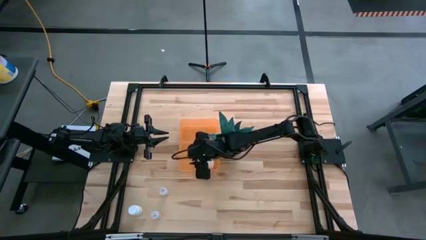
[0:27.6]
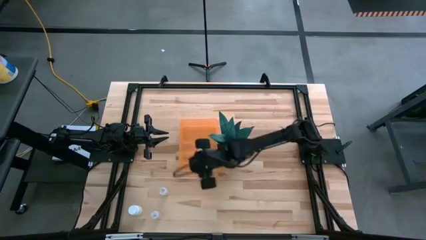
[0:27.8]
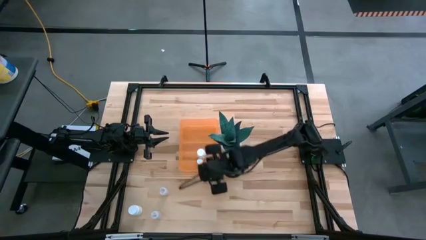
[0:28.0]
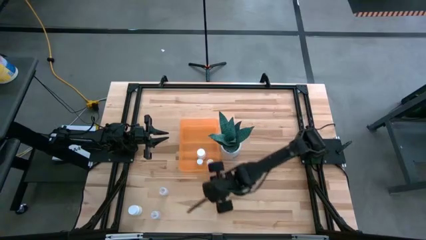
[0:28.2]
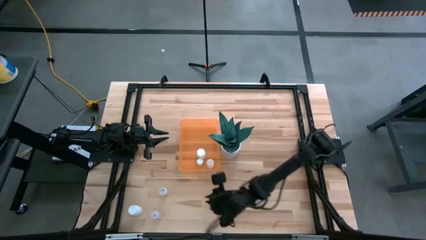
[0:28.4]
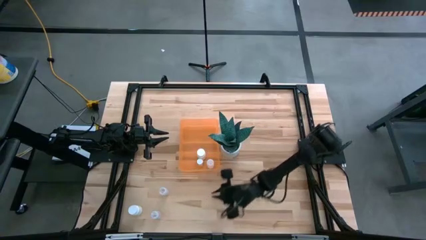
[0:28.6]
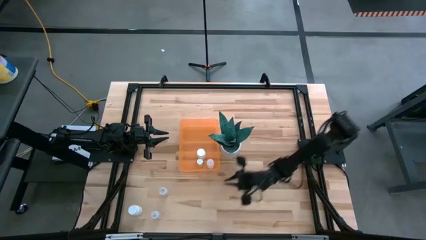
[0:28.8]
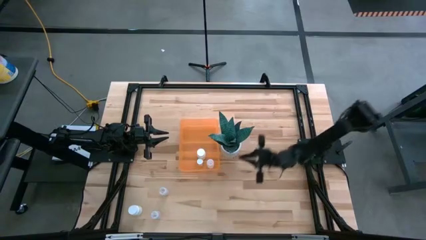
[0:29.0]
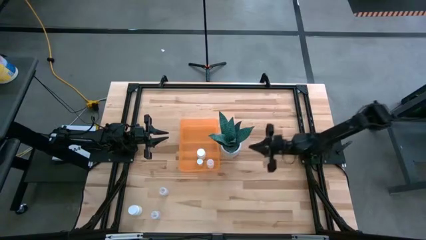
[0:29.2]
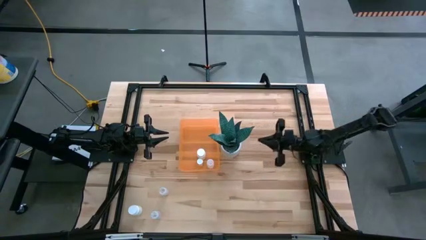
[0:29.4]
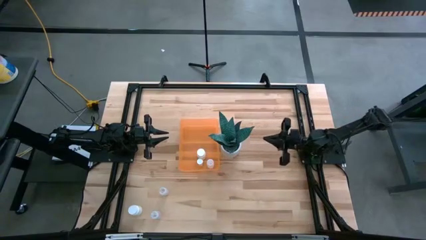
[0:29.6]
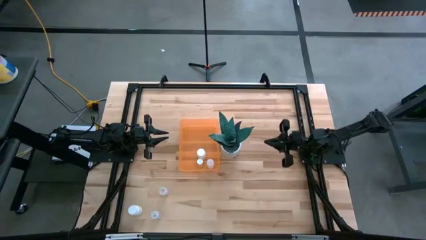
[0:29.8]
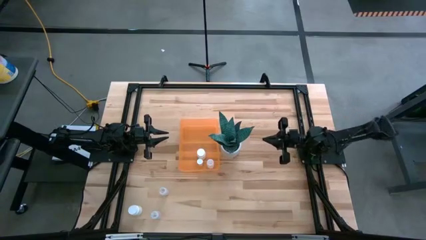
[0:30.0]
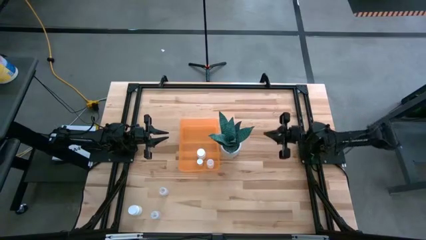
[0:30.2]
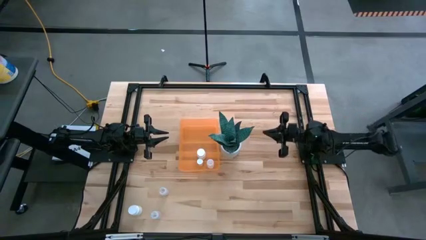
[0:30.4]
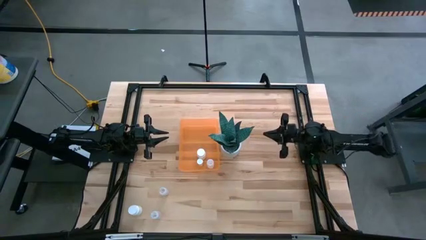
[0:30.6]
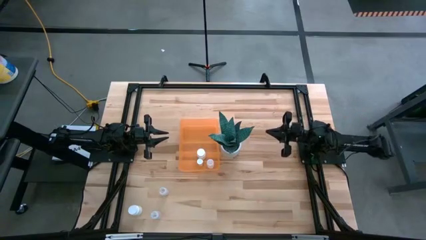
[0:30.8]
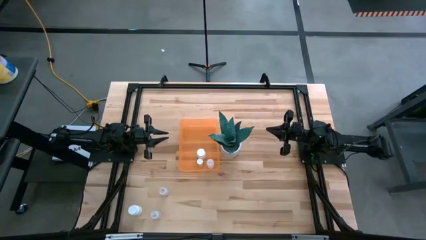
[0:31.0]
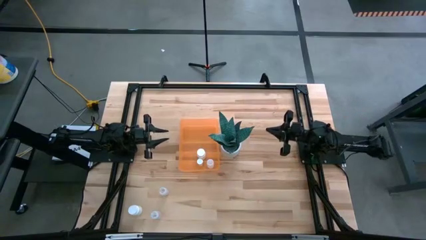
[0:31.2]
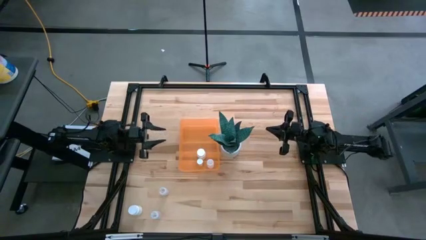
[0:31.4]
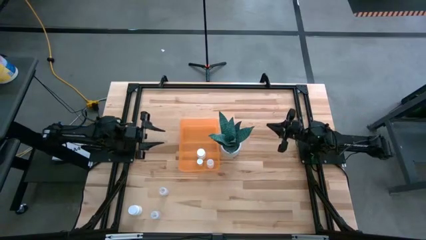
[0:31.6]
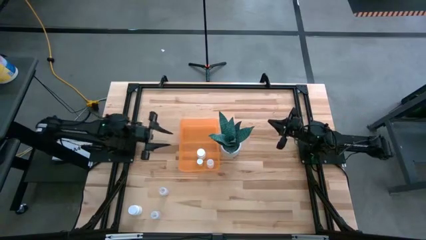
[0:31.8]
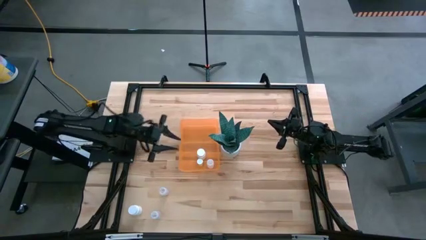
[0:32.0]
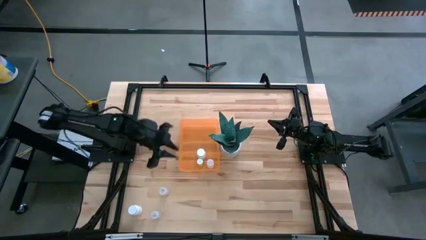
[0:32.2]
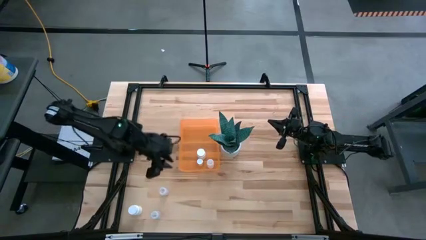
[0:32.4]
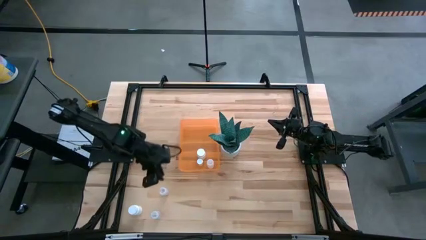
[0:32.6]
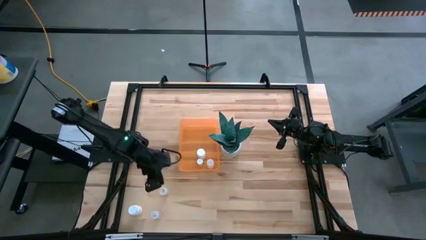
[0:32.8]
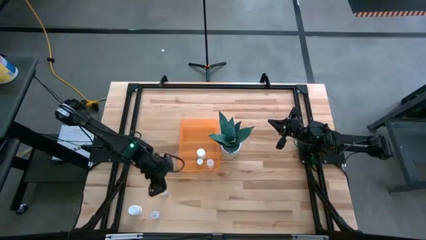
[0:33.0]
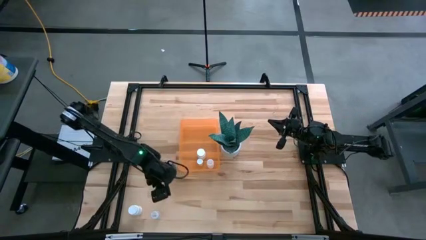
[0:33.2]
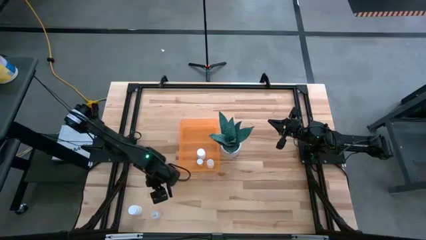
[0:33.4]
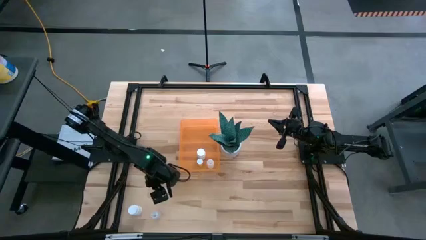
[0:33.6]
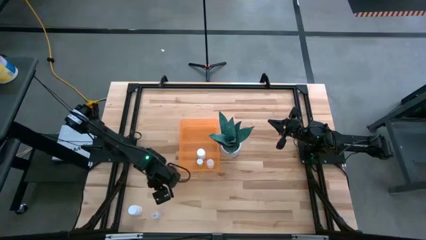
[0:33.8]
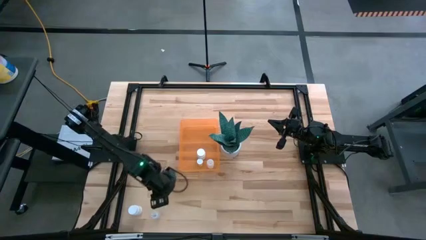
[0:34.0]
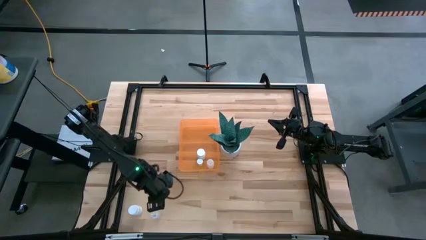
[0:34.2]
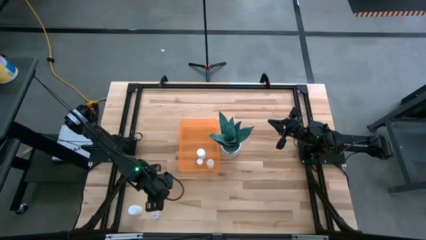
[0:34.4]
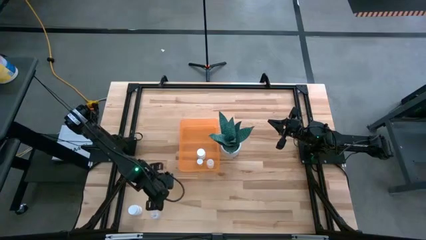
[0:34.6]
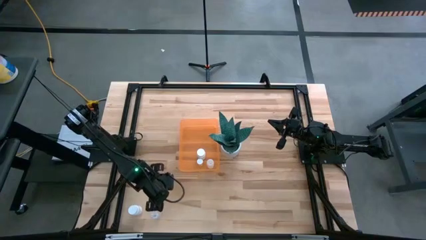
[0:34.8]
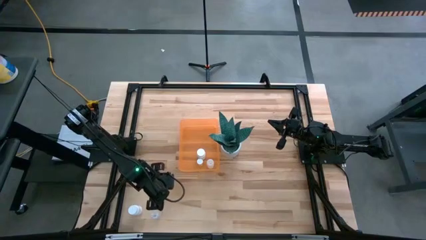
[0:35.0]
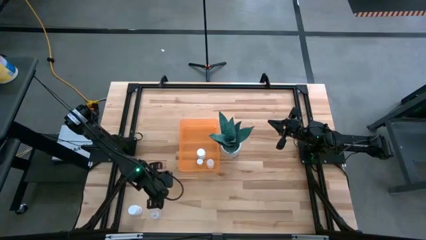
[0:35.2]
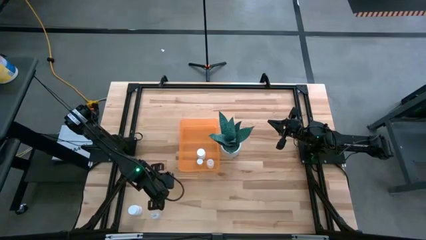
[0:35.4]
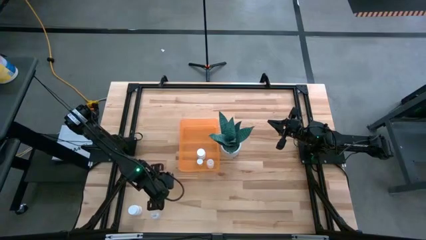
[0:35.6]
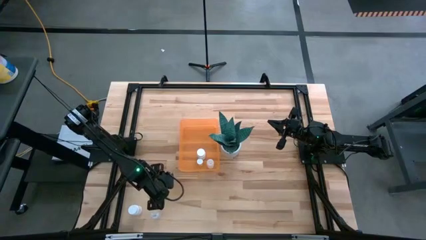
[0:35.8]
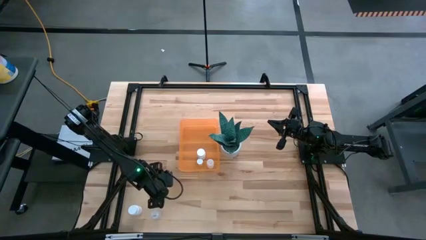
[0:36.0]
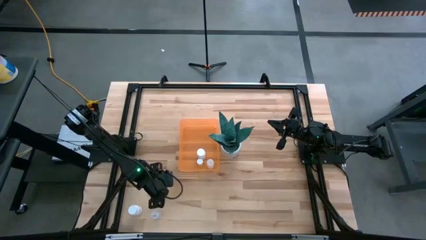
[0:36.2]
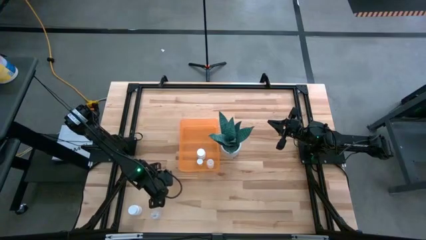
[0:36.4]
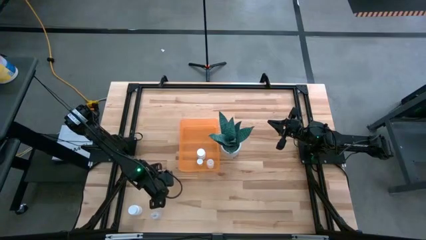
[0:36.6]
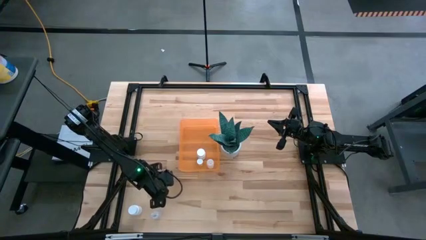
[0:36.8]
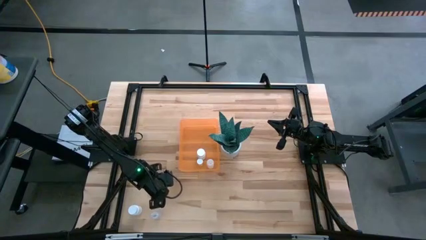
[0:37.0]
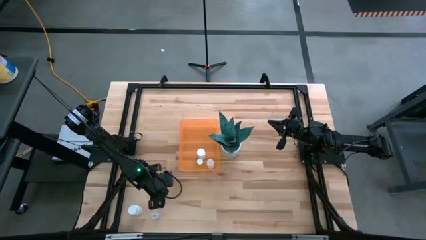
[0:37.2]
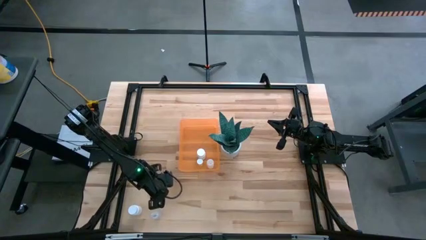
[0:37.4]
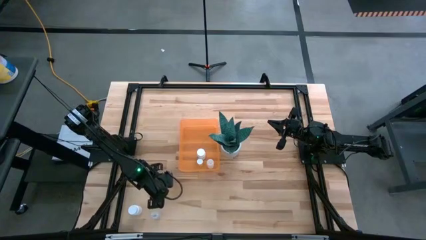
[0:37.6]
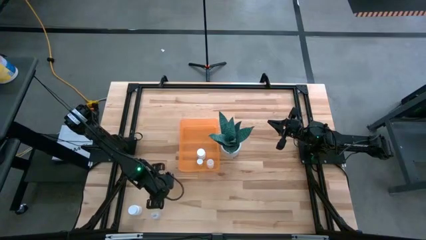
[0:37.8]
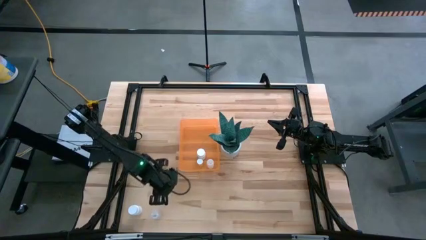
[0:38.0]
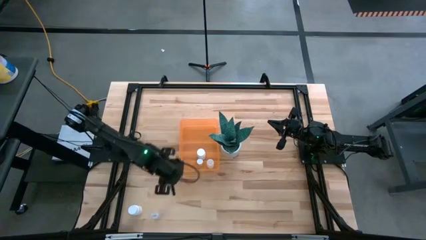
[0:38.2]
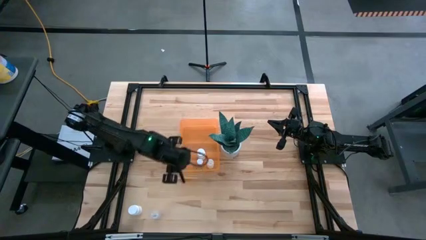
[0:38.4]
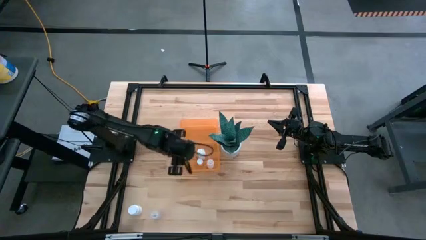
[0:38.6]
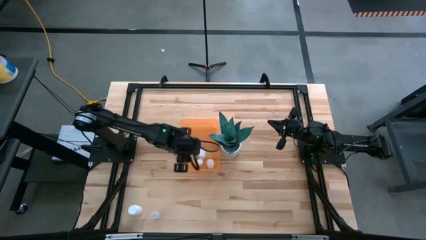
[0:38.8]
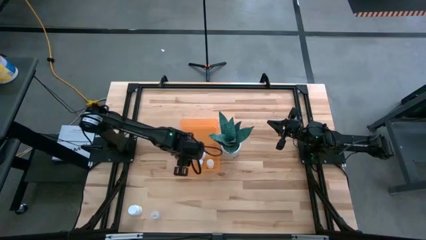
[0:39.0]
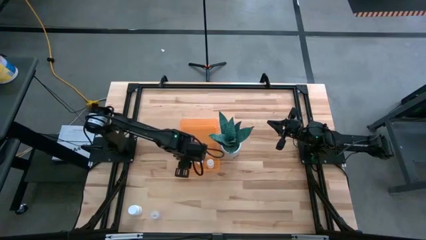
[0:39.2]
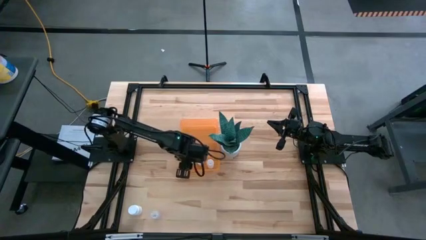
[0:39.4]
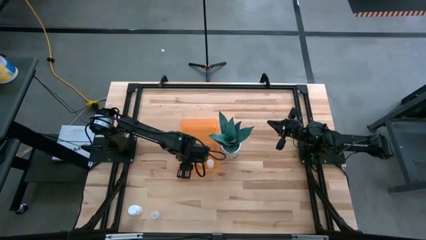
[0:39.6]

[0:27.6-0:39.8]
Task: Pick and place pill bottles into a basket
Put the top transparent pill bottle into the orange container

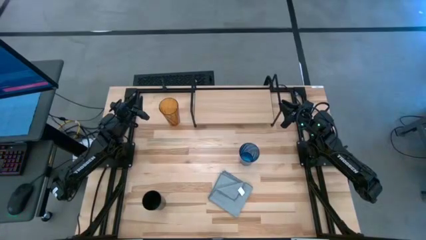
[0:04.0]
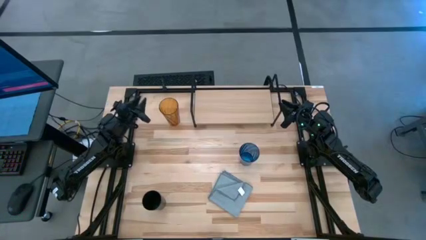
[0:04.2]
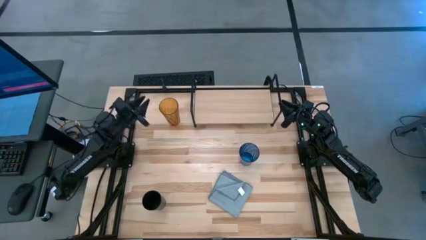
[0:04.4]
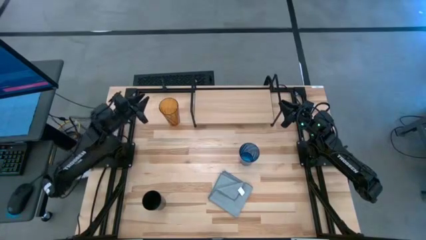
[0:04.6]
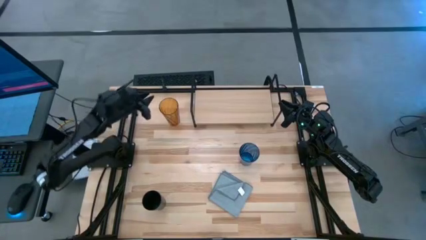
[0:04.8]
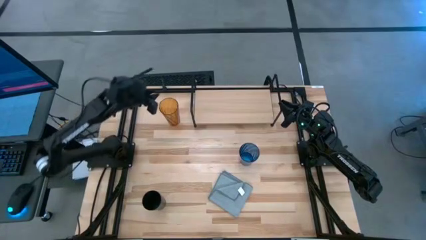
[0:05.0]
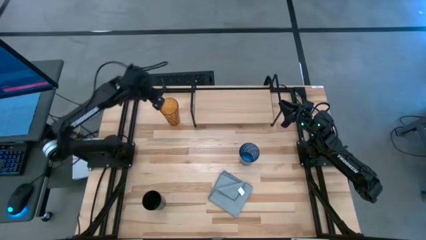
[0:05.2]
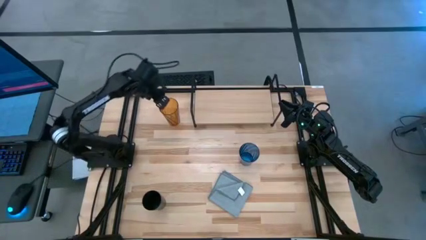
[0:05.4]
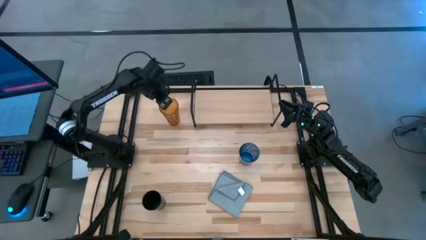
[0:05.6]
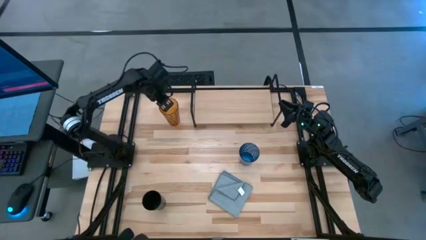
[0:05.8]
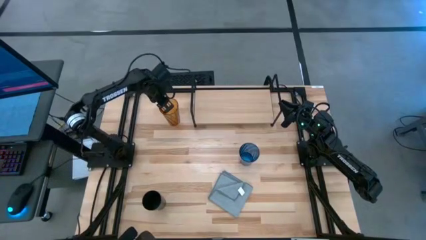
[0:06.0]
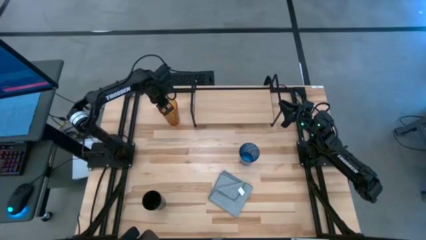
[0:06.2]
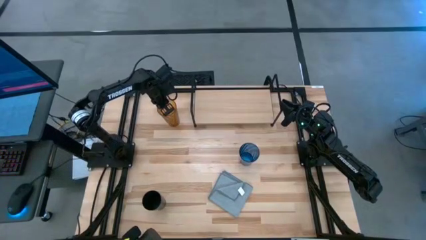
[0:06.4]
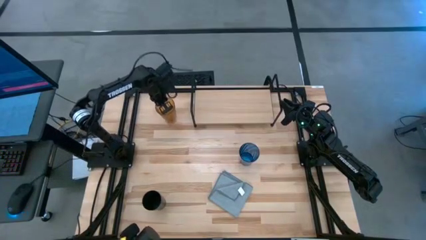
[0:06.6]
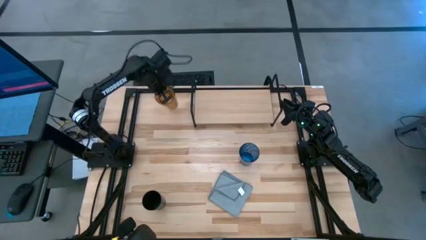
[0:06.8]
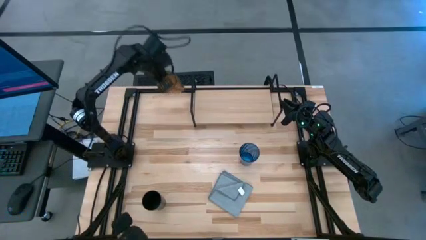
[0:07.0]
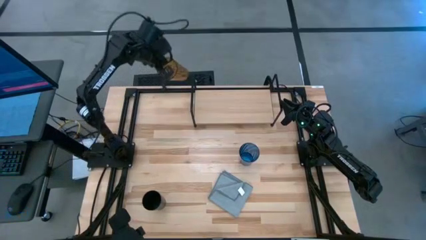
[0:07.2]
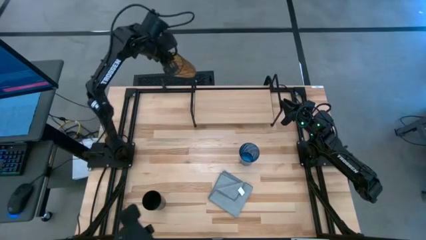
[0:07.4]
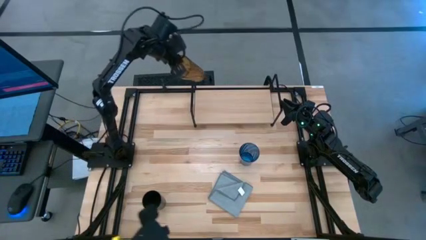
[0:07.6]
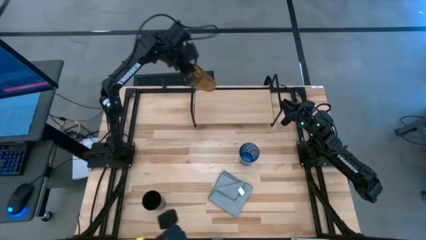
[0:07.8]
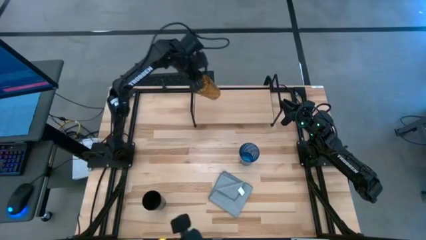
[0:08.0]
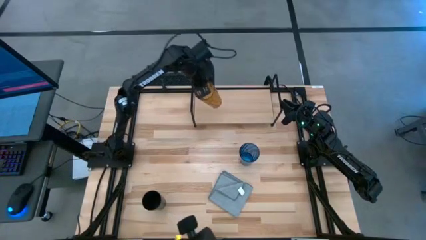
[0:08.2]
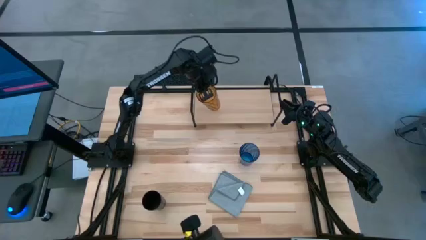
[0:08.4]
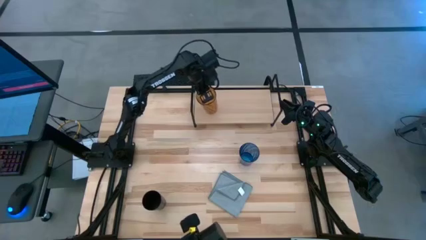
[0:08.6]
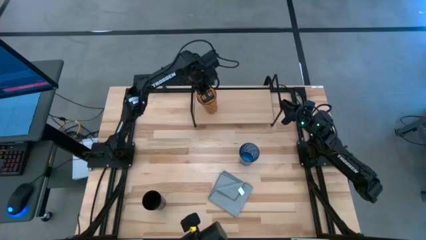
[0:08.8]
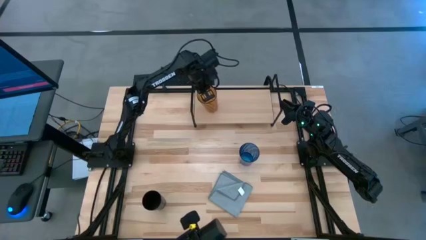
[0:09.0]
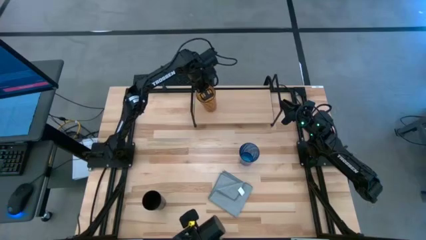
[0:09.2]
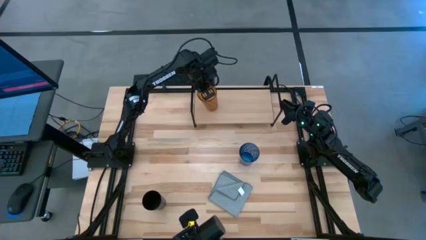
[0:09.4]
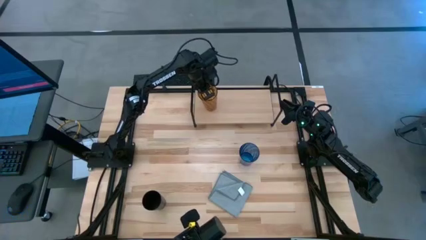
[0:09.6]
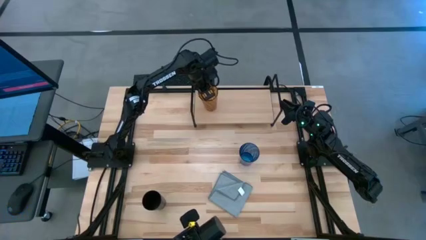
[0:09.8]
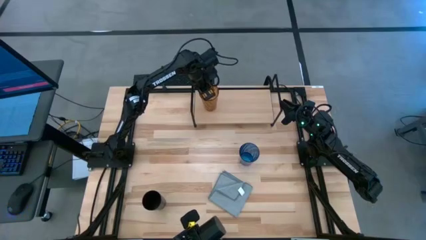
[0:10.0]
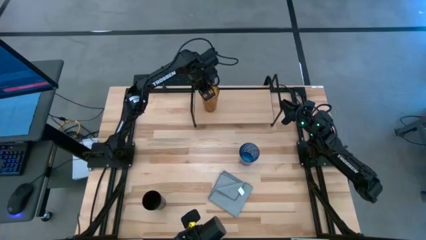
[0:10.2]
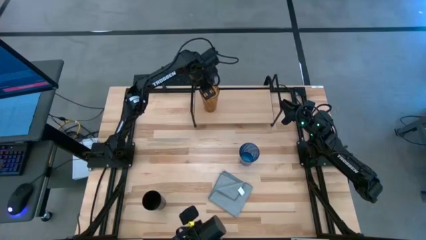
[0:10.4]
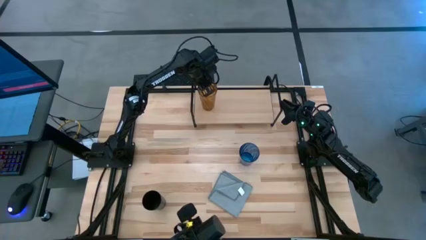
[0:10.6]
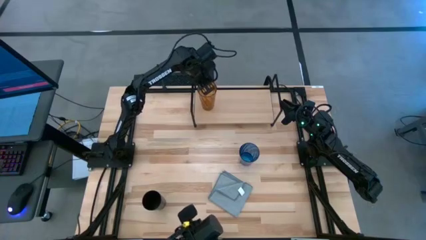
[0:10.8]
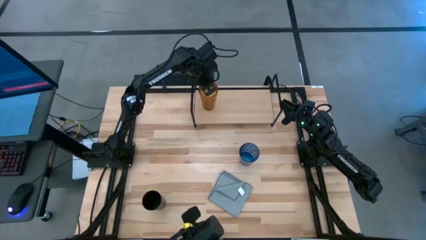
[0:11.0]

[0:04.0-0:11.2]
Task: Stack small to large cups/mugs on shelf
Put the orange cup on the shelf
